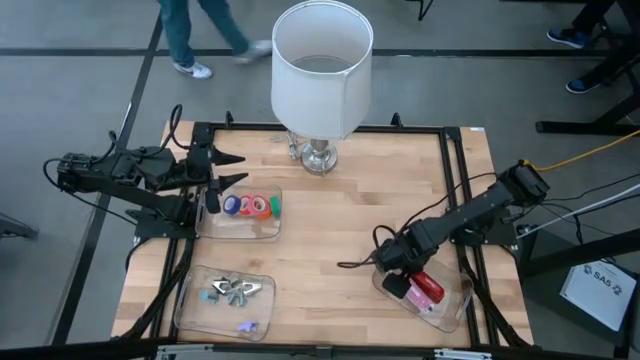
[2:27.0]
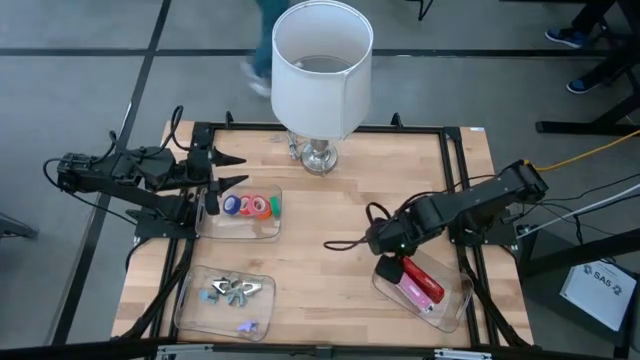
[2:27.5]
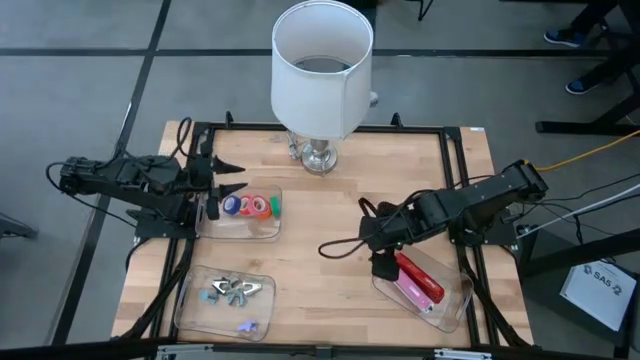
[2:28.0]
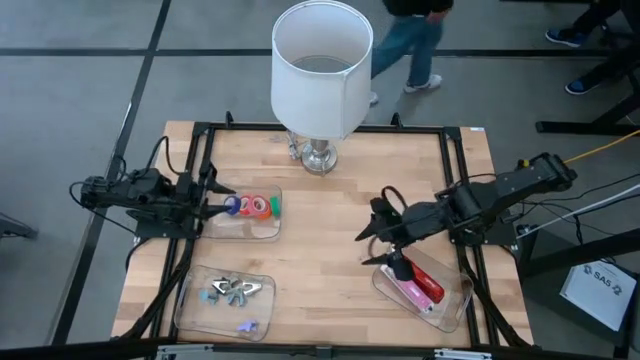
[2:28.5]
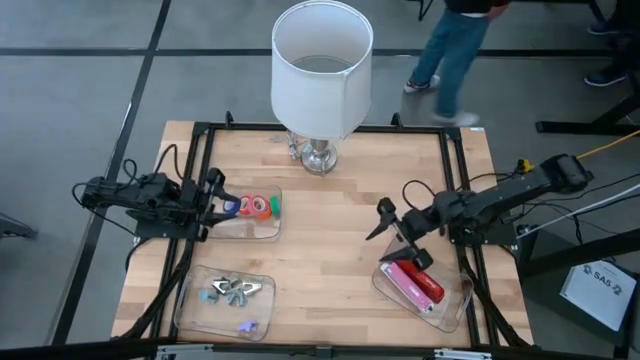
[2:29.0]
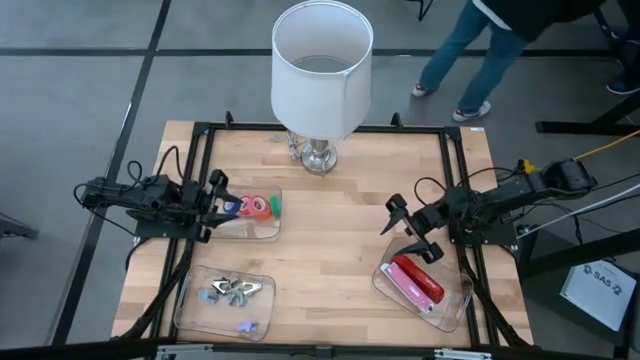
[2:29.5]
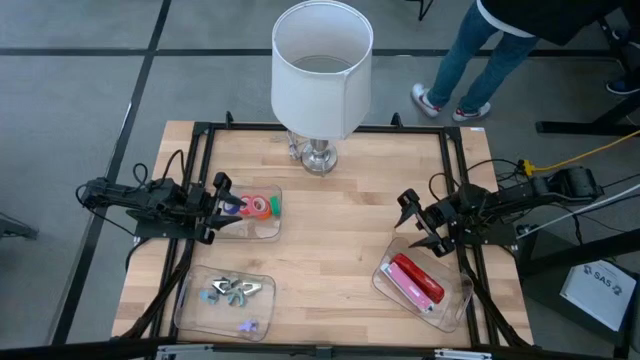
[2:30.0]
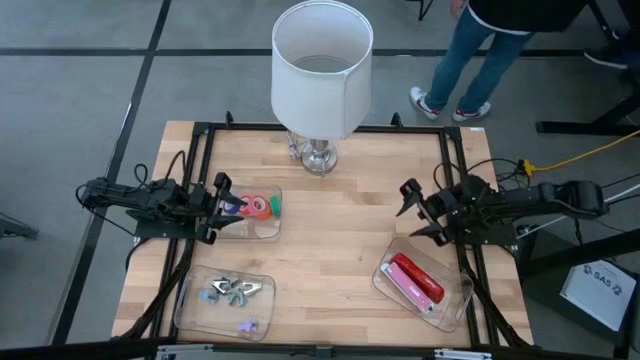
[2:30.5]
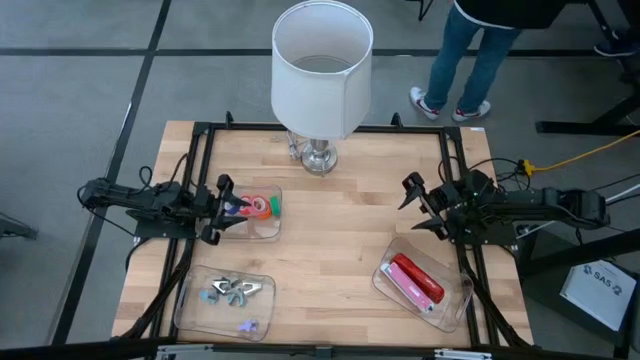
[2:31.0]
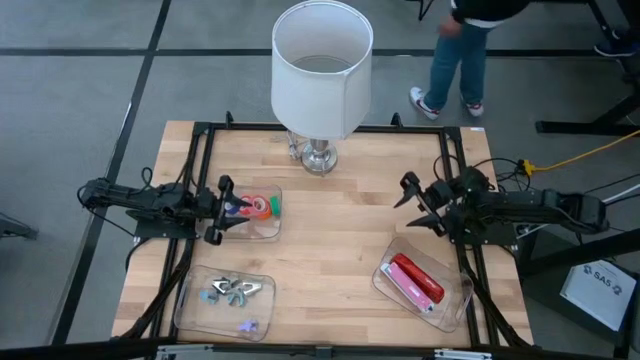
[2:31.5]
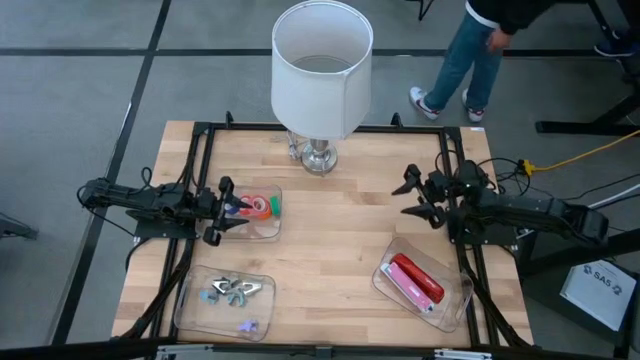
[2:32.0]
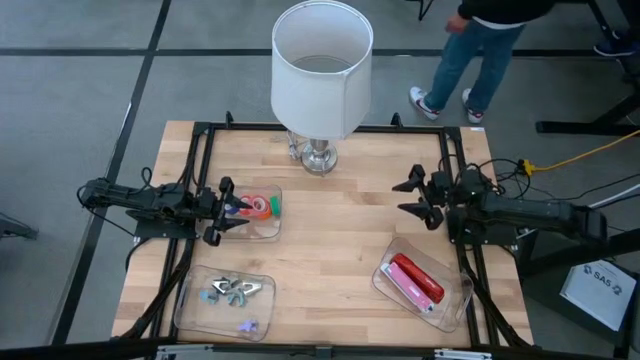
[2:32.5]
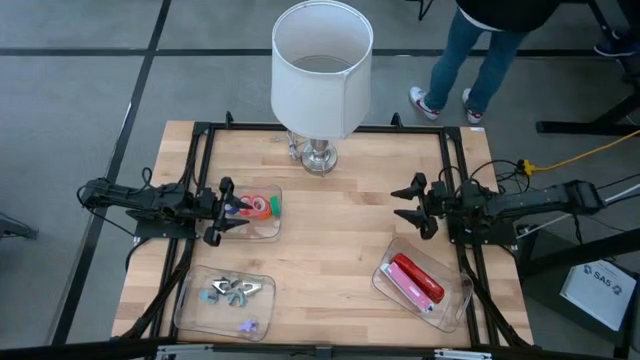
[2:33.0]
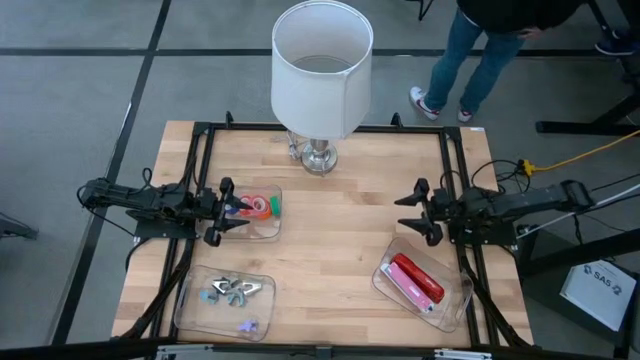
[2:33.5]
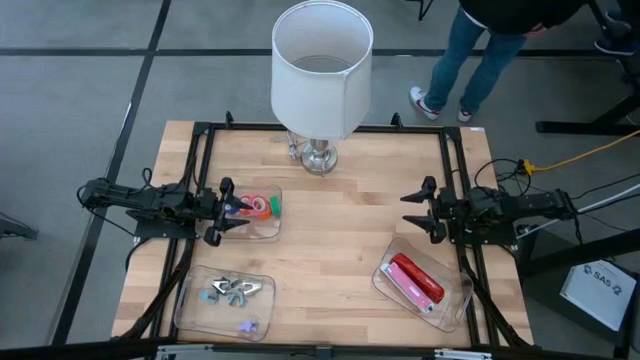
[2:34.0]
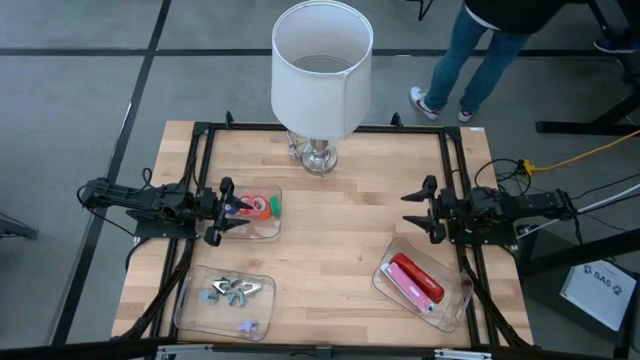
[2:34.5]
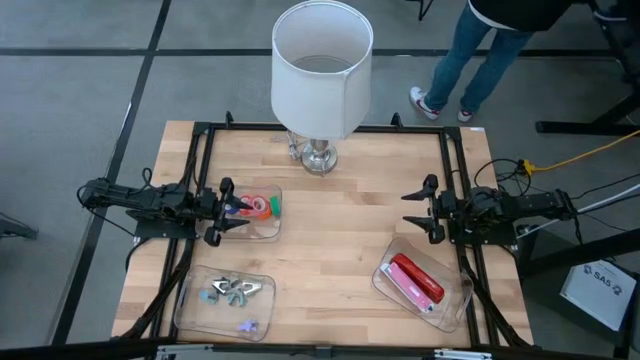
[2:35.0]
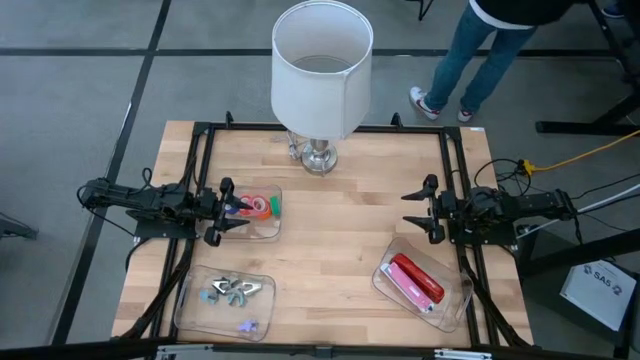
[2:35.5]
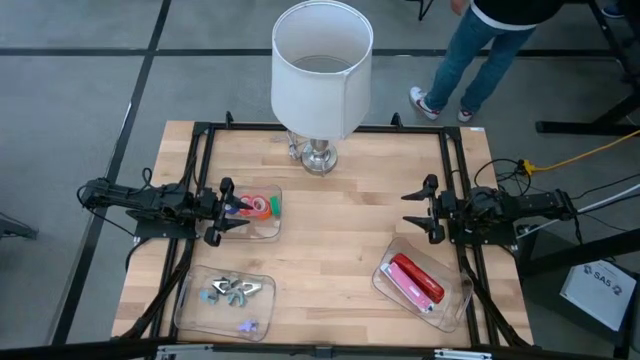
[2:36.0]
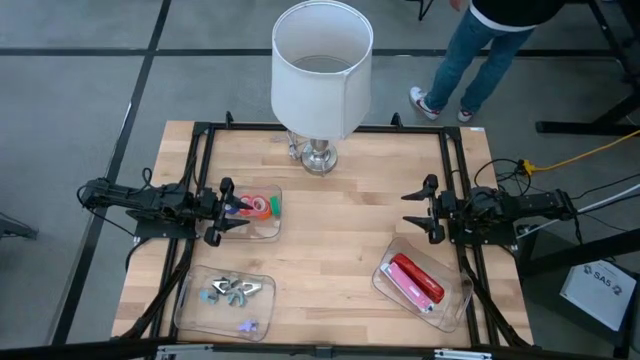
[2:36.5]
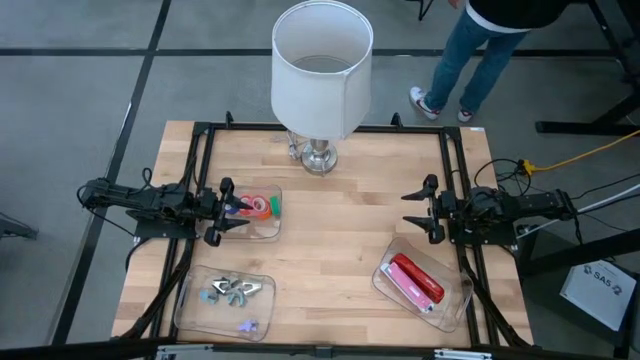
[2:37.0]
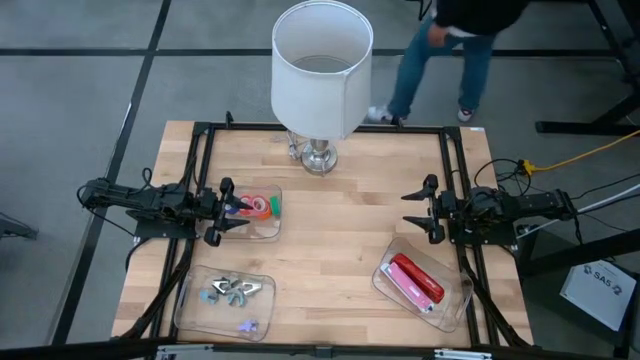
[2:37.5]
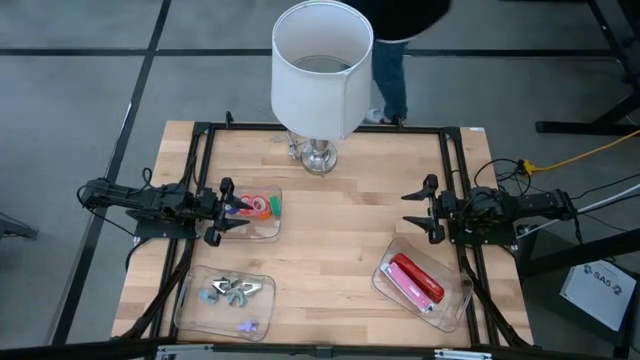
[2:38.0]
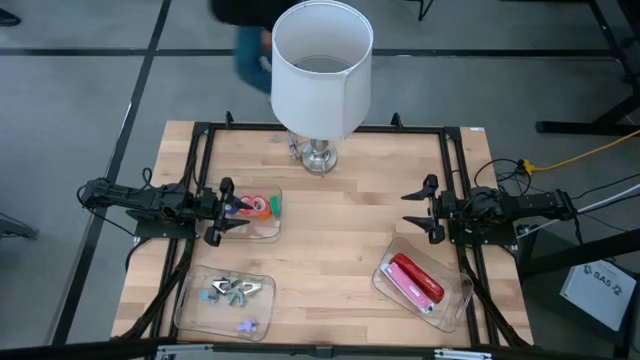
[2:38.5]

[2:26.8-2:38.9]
Task: Pick and place Stapler, Stapler remover, tape
Return to Home Position

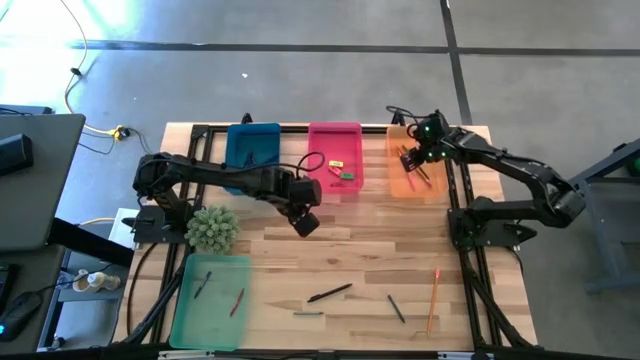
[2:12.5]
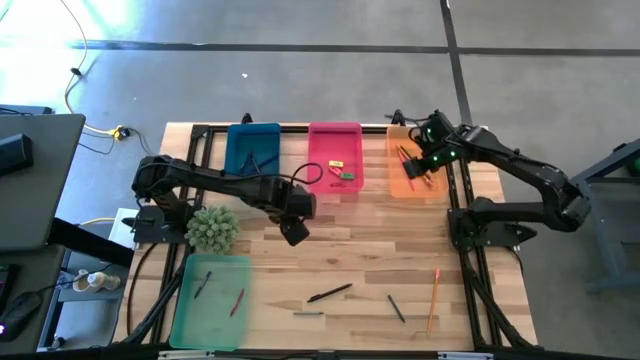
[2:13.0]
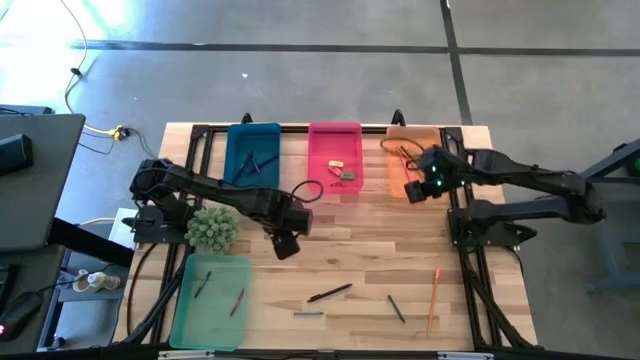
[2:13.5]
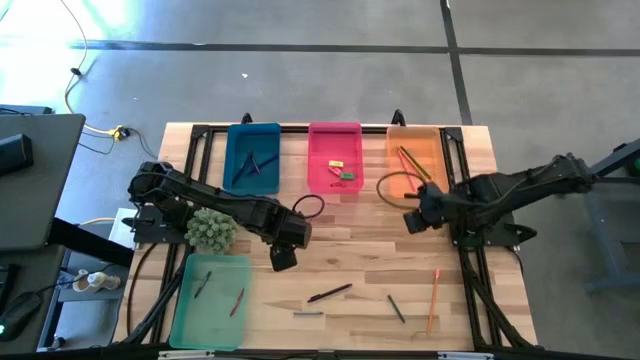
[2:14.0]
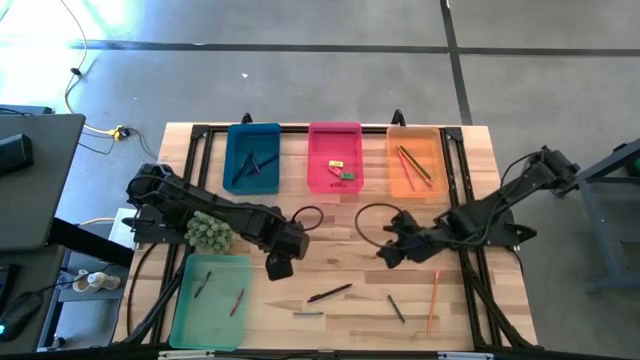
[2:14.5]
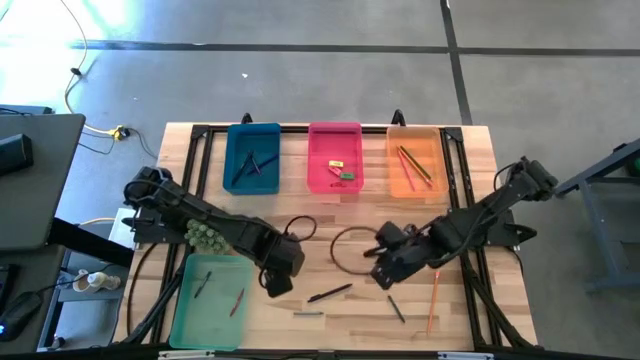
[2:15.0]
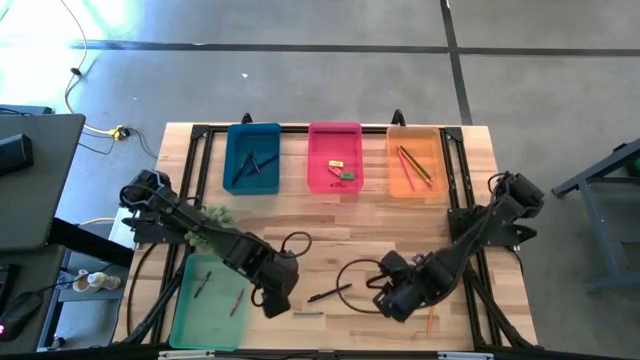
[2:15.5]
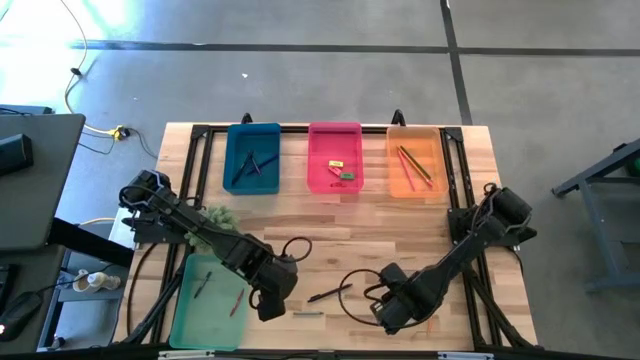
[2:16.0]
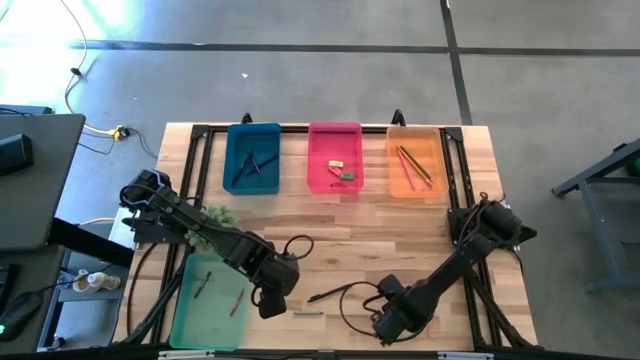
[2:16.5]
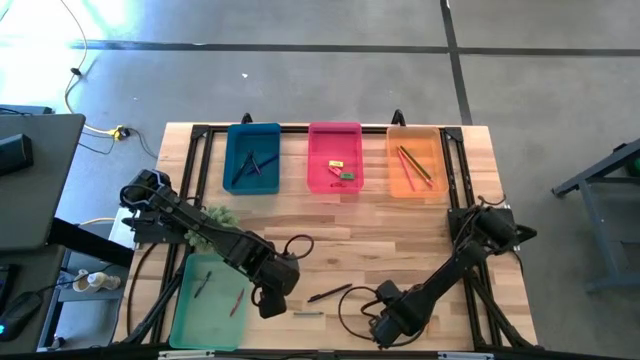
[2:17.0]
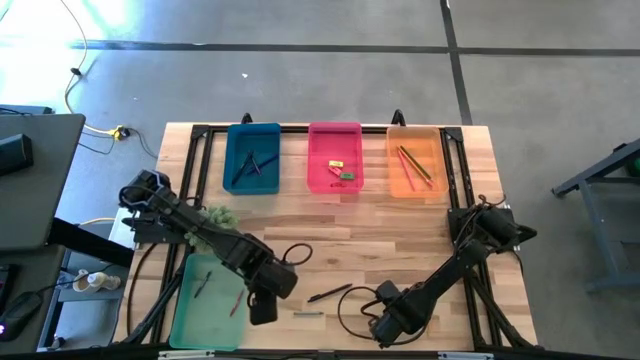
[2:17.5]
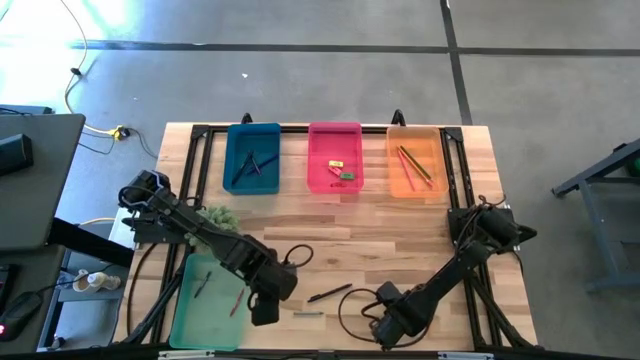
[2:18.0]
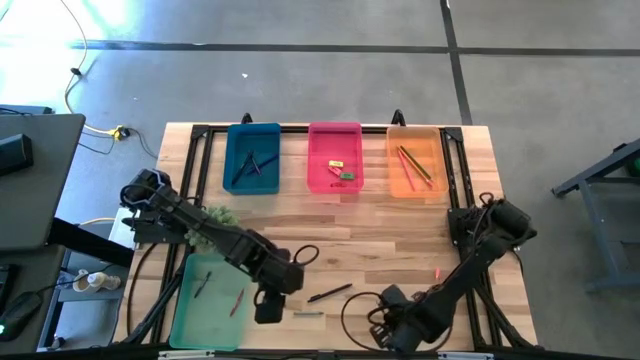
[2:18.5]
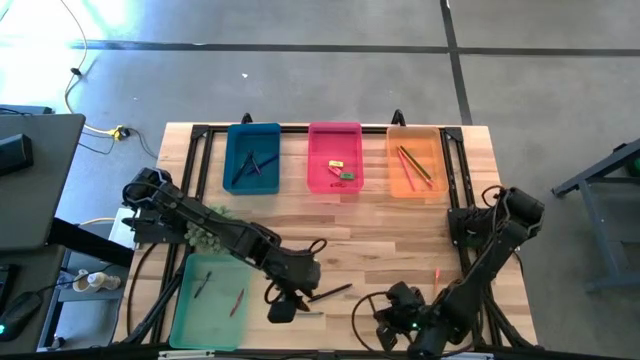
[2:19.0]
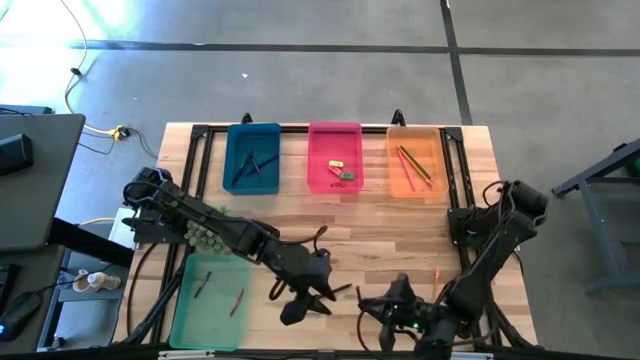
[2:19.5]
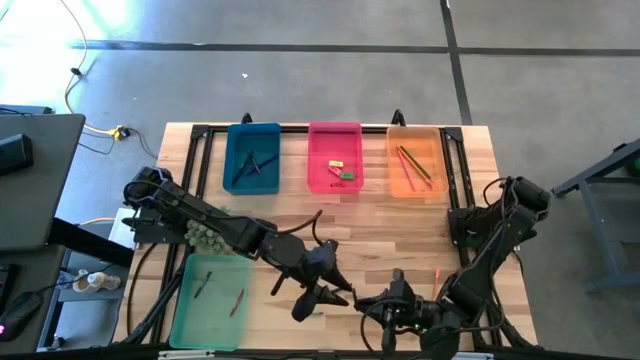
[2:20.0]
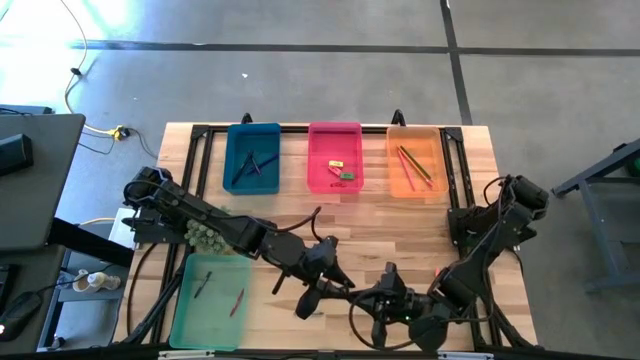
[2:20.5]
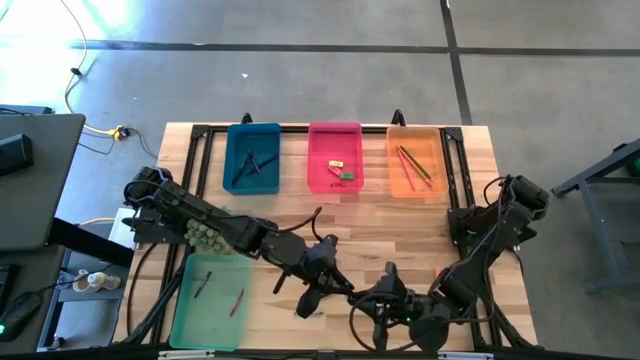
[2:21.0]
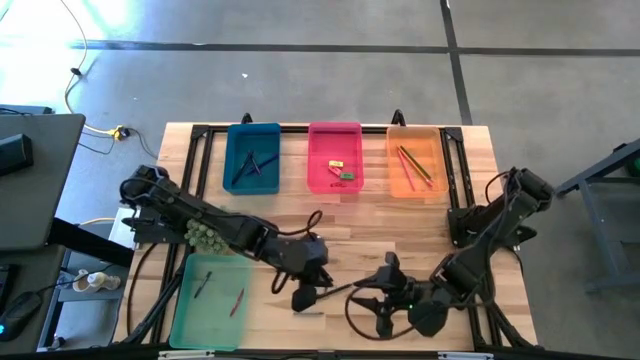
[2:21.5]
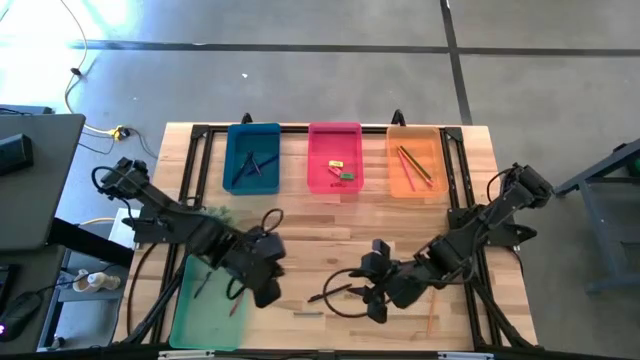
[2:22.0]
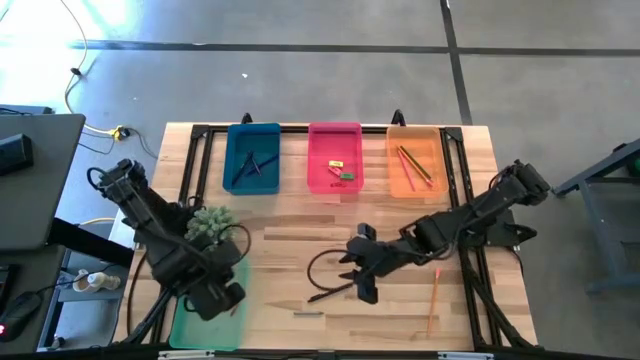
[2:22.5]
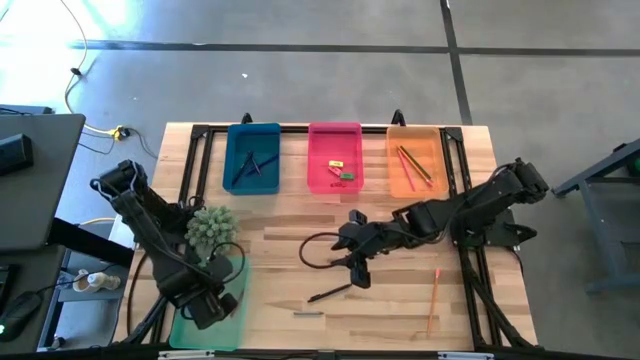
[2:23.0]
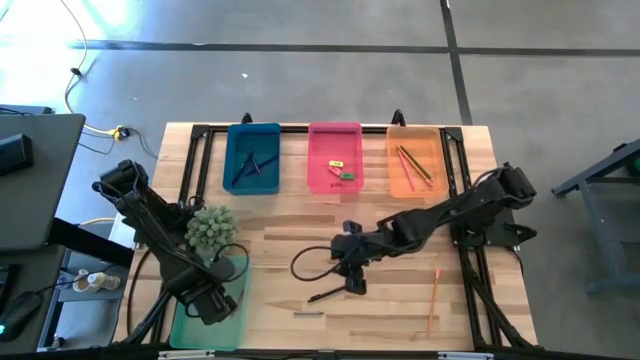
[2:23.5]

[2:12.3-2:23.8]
Task: Sort crayons/erasers/pens/pencils in bins
Put the green crayon into the green bin
